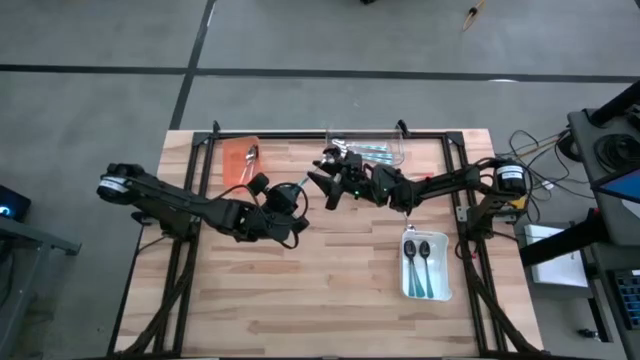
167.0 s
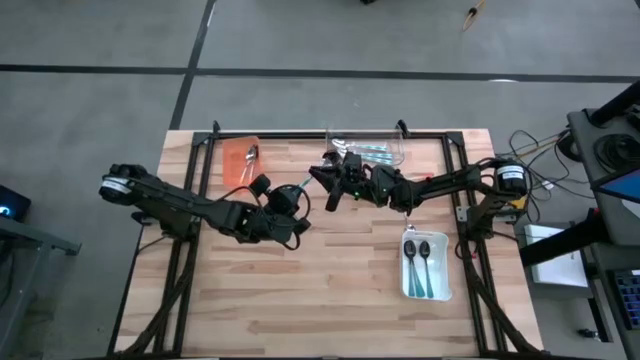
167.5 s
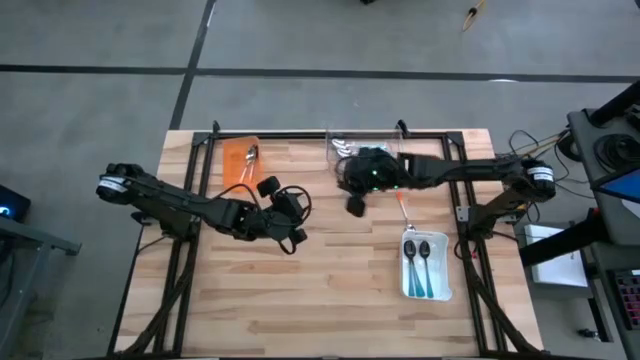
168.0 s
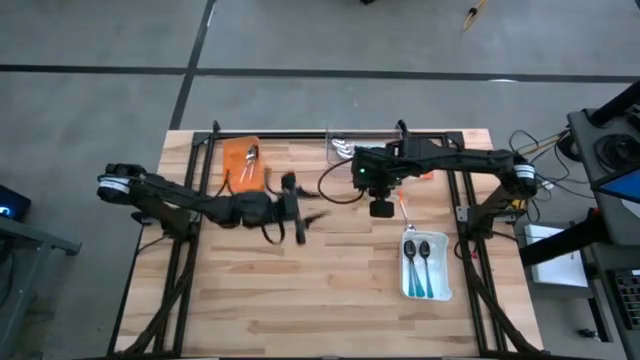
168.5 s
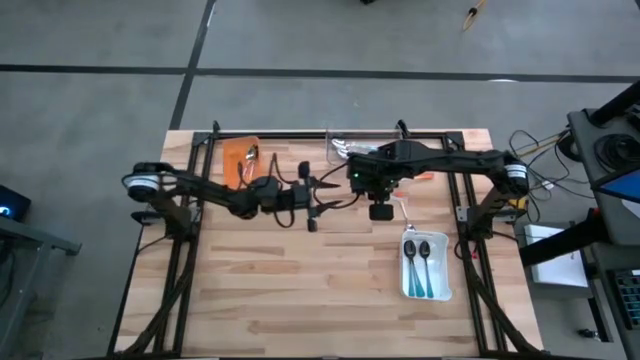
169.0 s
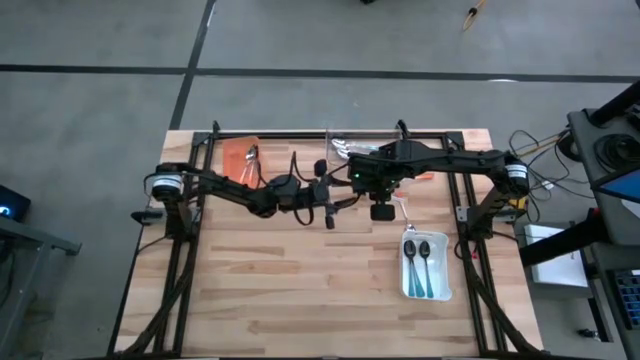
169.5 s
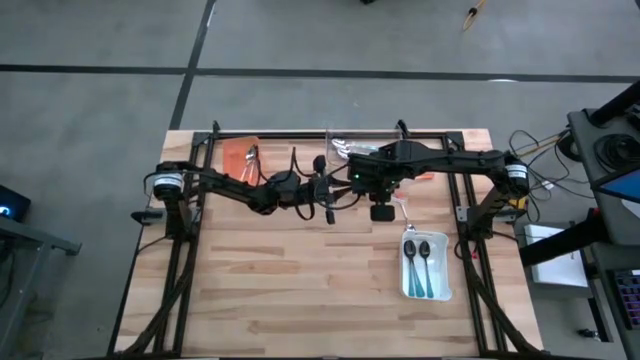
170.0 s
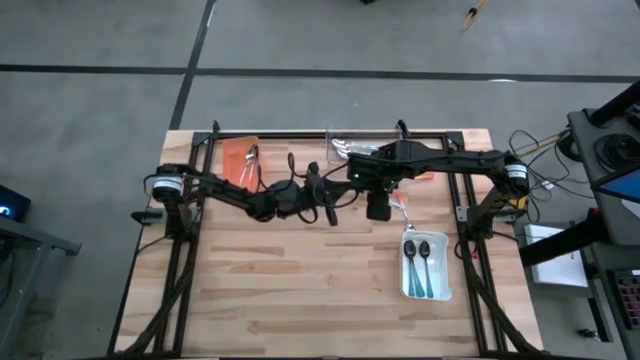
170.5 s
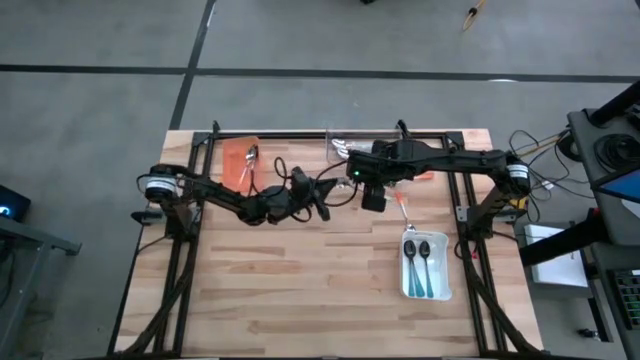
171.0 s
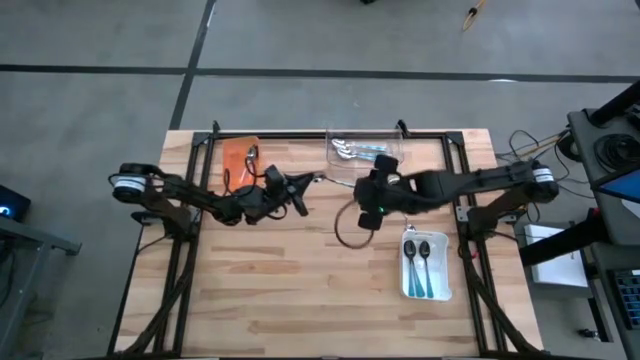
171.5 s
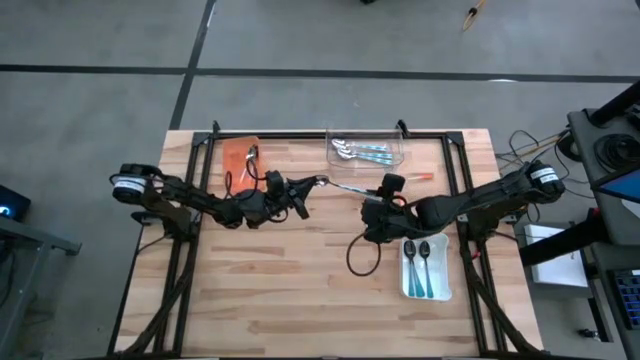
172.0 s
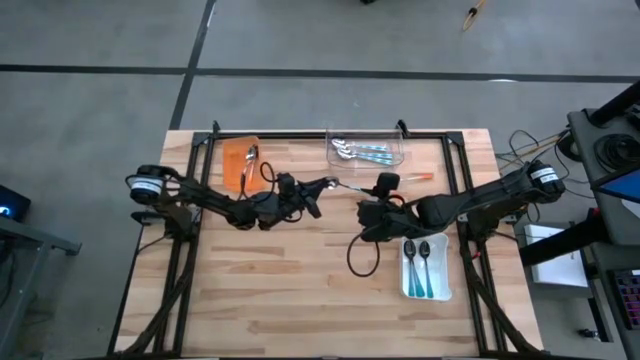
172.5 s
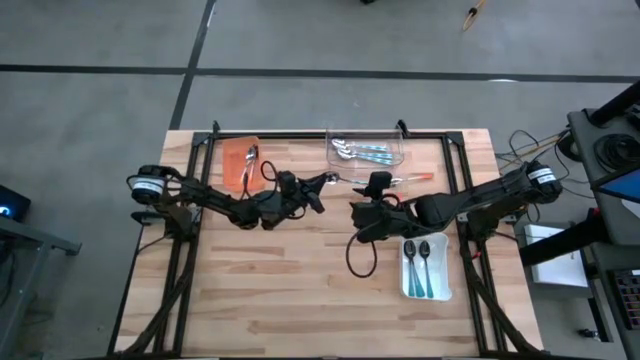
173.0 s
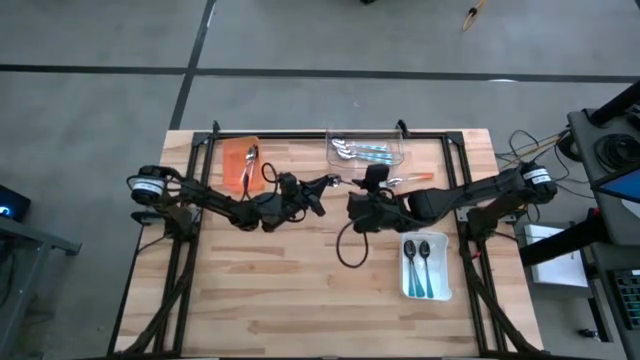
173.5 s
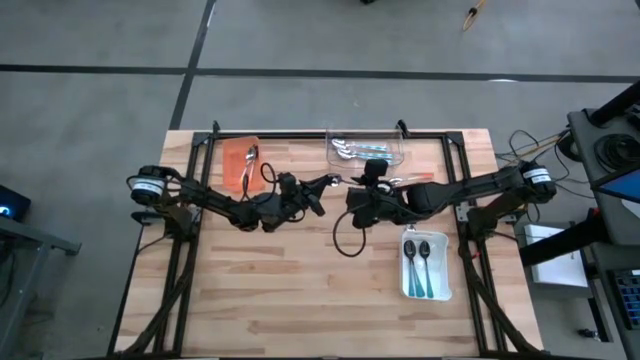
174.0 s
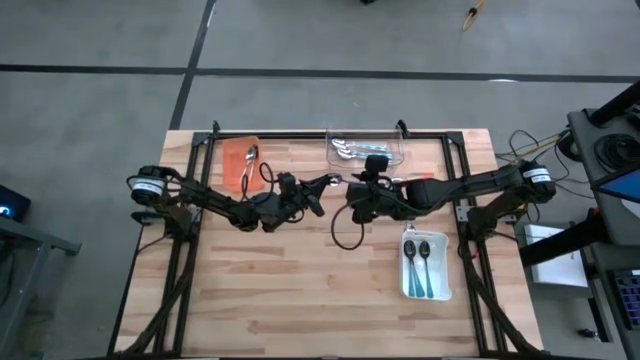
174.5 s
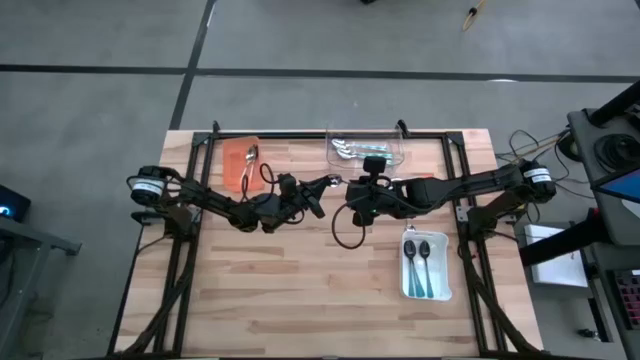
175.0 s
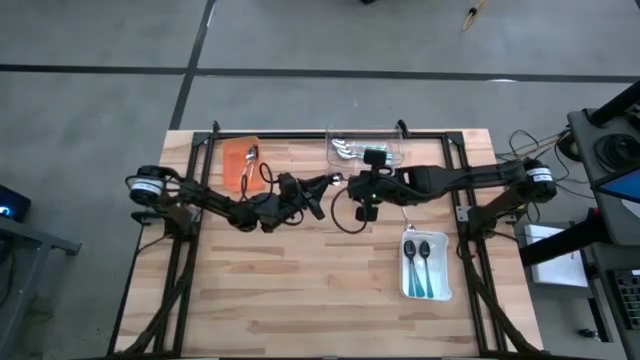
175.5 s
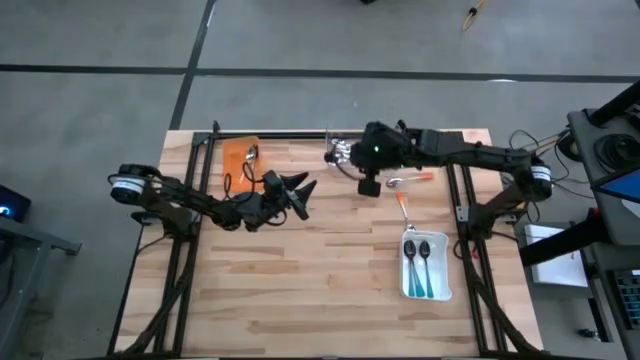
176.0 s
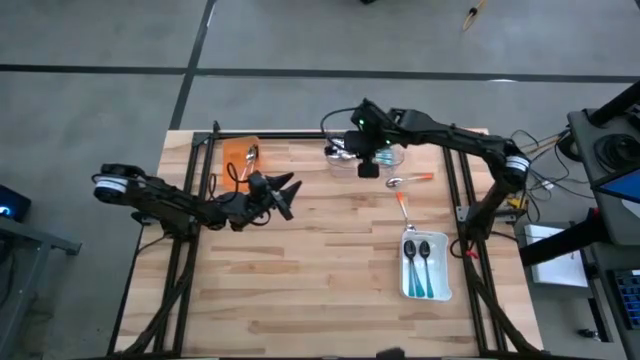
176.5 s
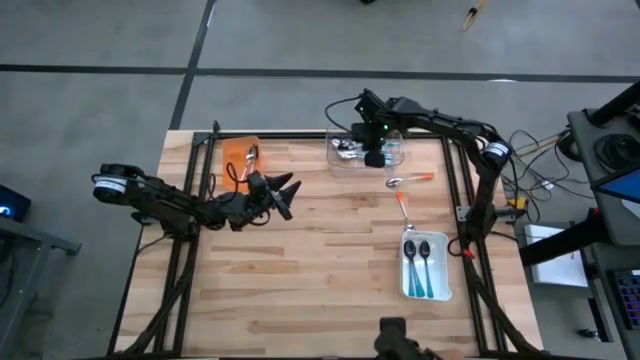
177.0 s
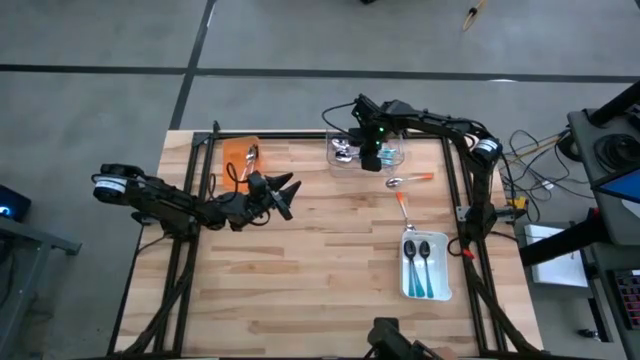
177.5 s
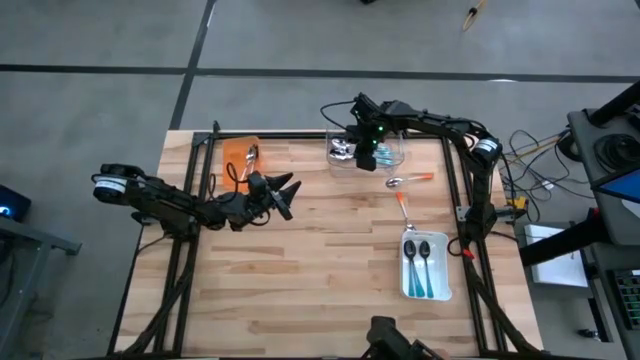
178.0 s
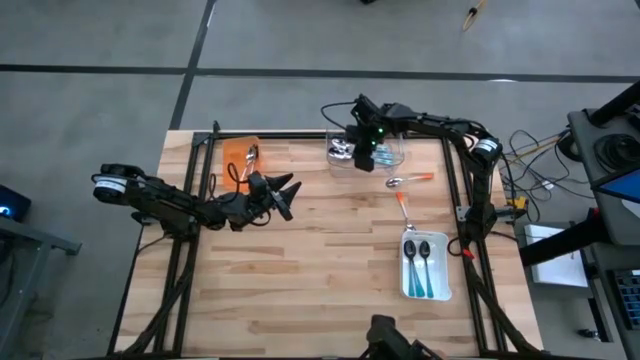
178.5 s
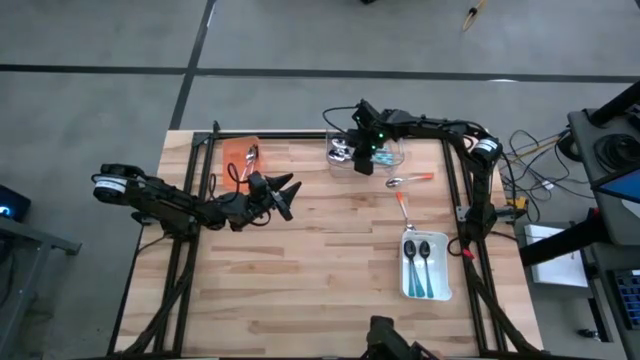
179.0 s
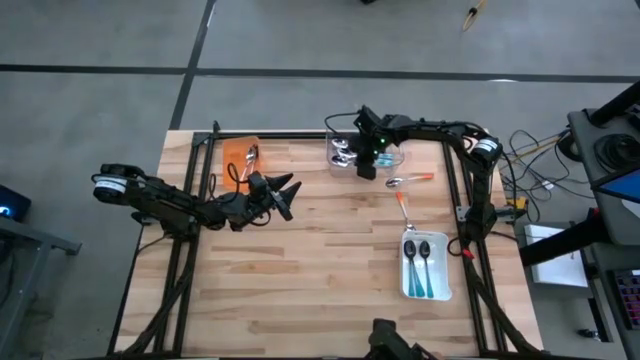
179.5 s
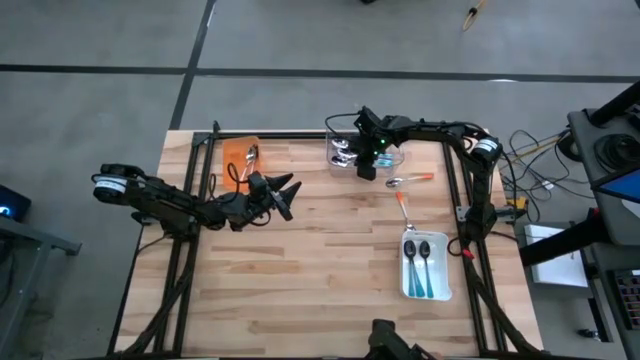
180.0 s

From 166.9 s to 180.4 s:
Task: Sort silverware by color (type)
Put the blue patterned spoon into the transparent bin

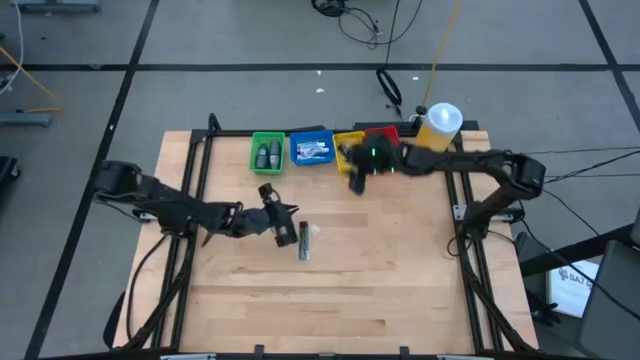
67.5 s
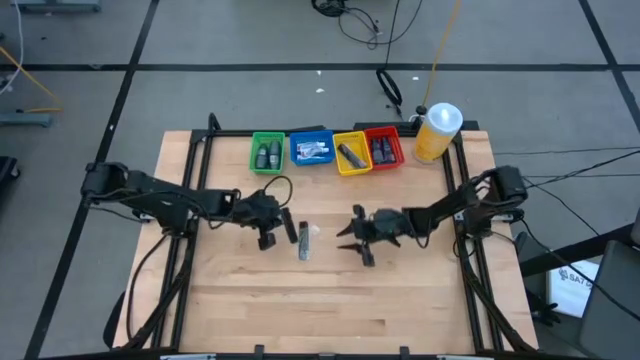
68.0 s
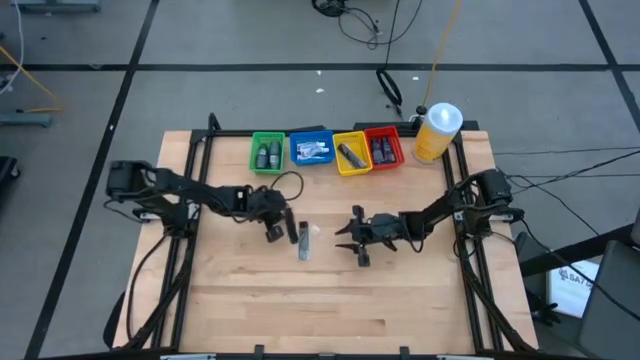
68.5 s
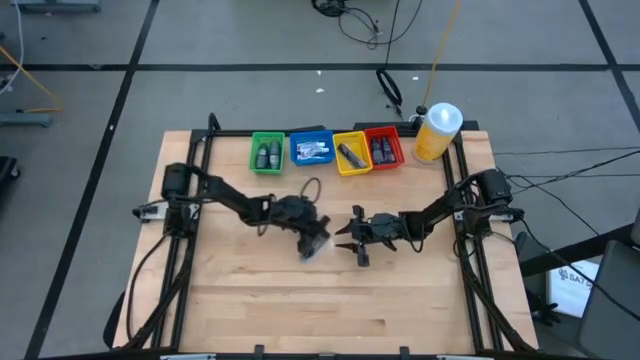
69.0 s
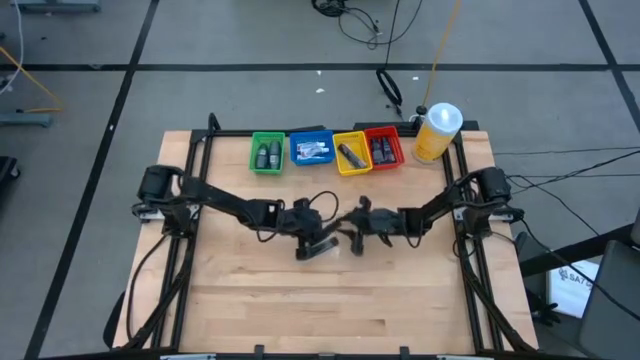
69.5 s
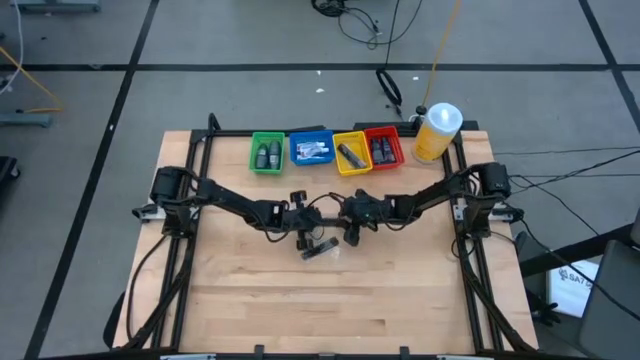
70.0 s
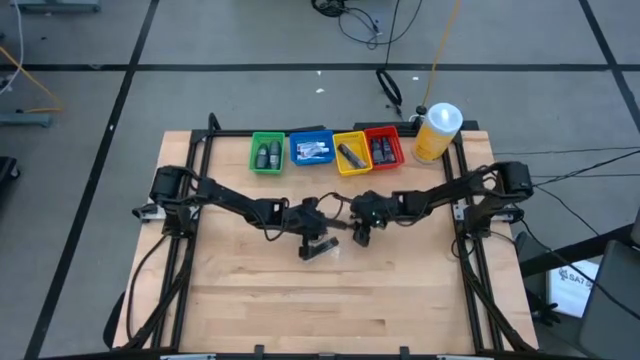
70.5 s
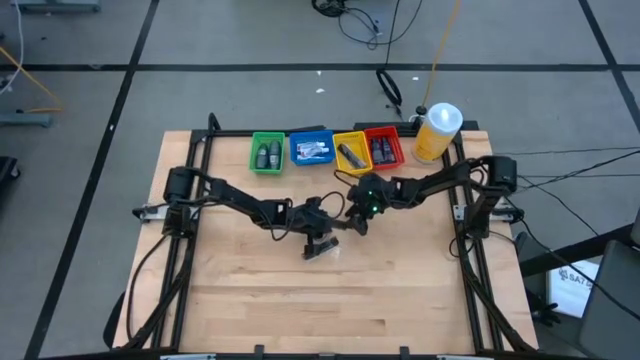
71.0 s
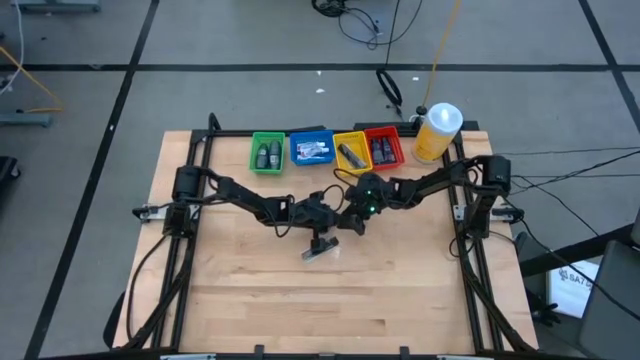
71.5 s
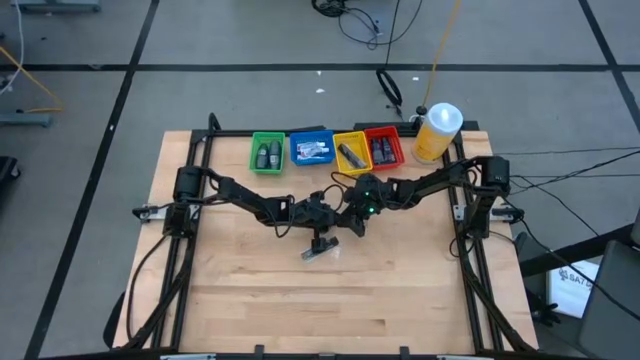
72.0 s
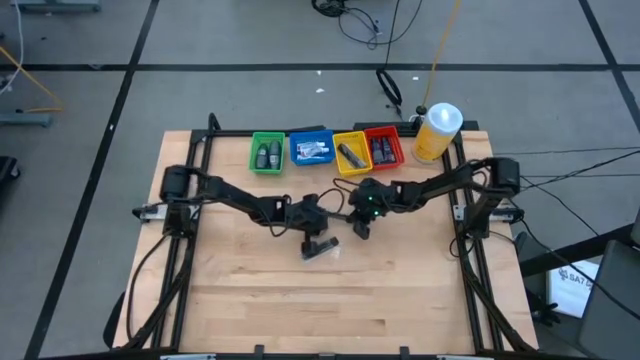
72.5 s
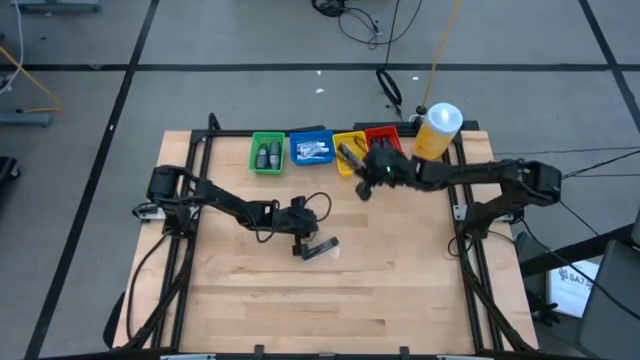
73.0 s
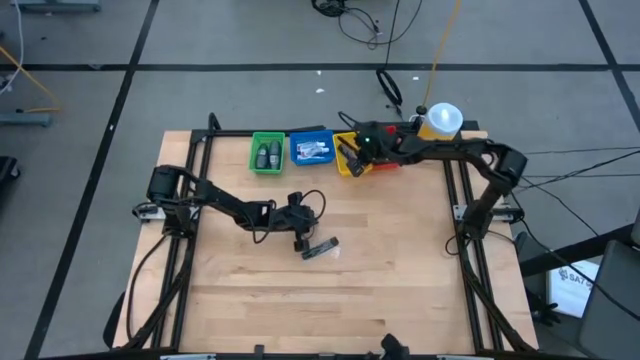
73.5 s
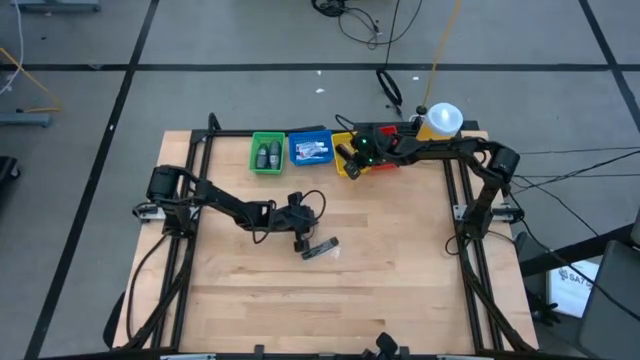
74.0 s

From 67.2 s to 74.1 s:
Task: Pick & Place Travel size toiletries
Put the left black comb into the yellow bin

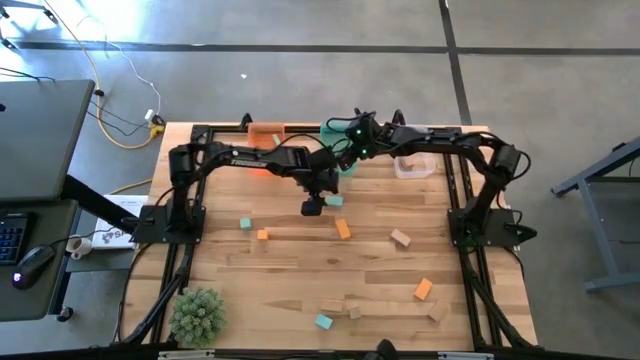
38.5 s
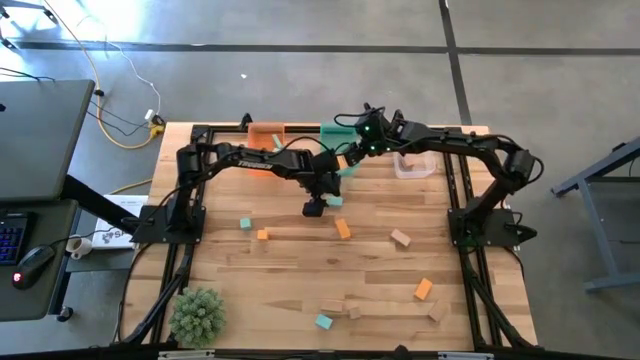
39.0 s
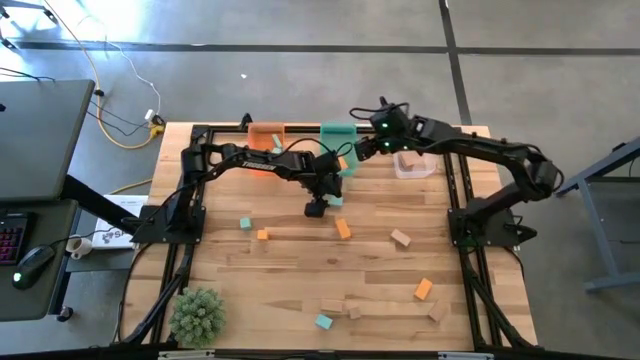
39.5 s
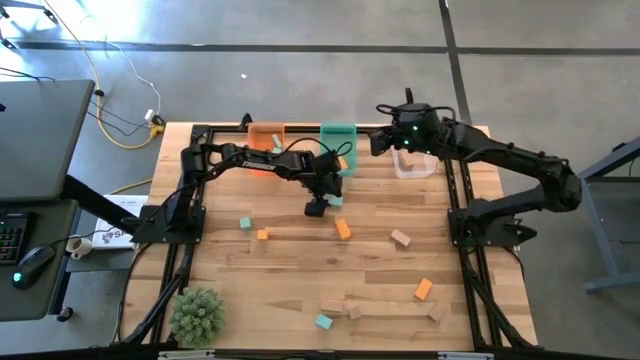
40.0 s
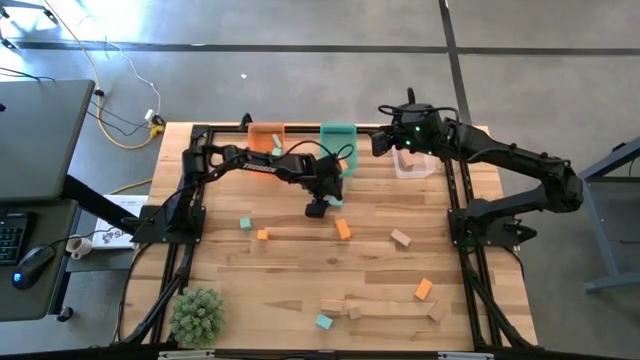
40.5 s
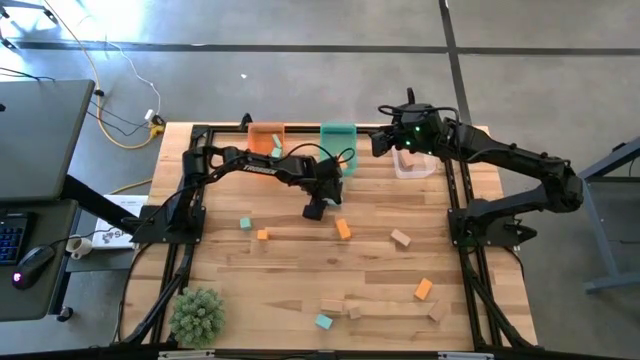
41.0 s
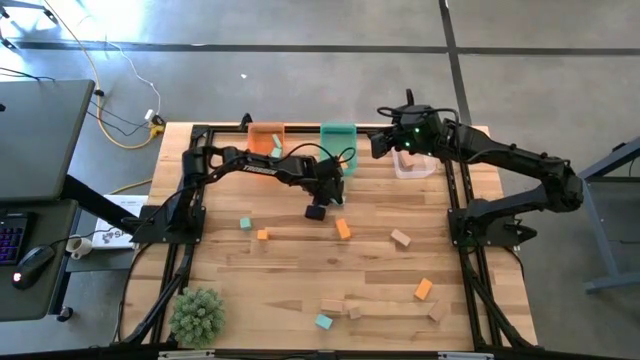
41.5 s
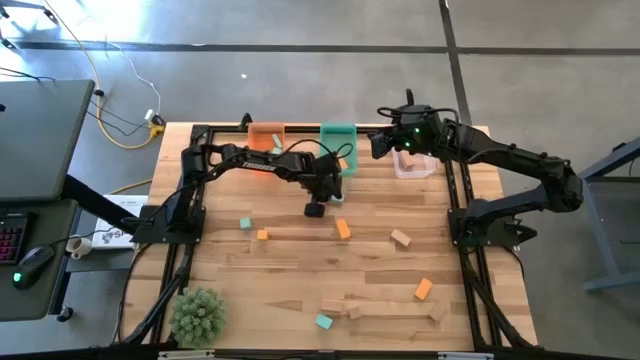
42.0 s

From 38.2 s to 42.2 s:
Task: Sort & place blocks by color
Put the light blue block into the orange bin
